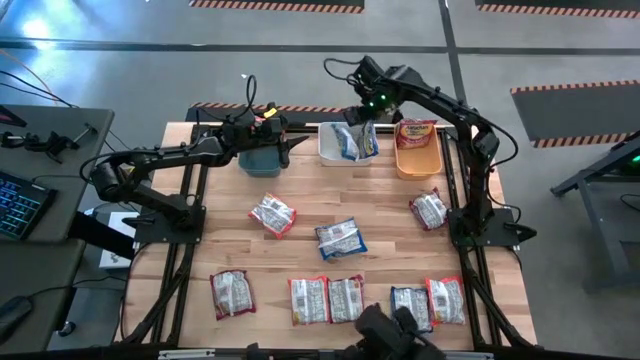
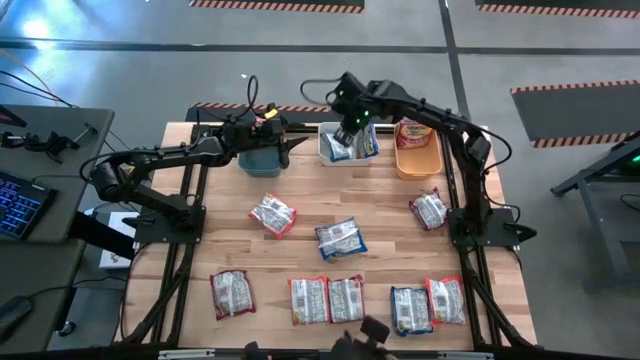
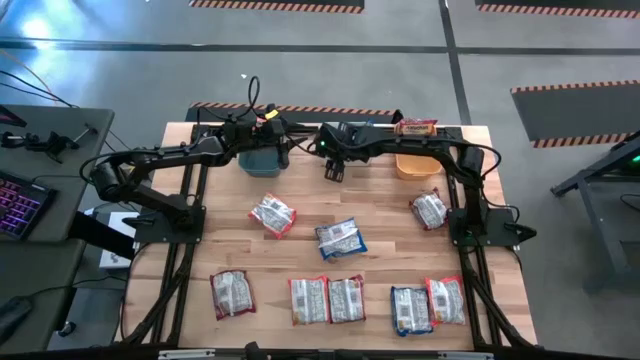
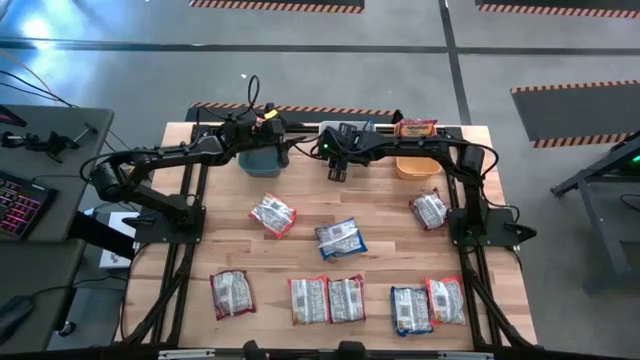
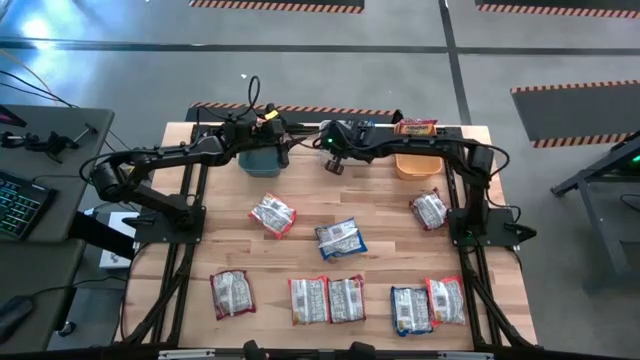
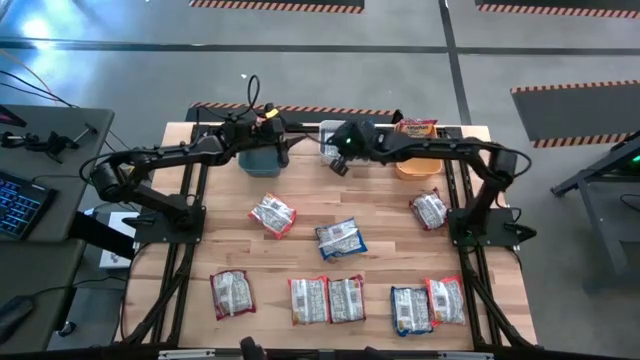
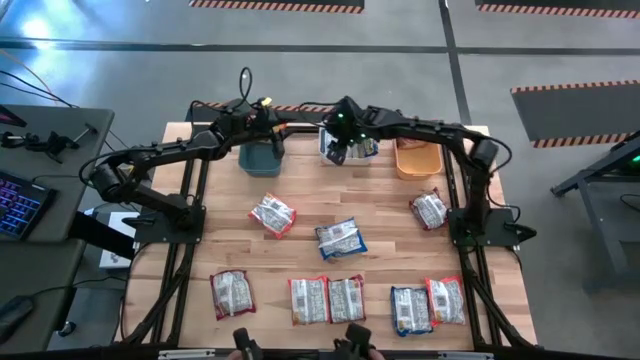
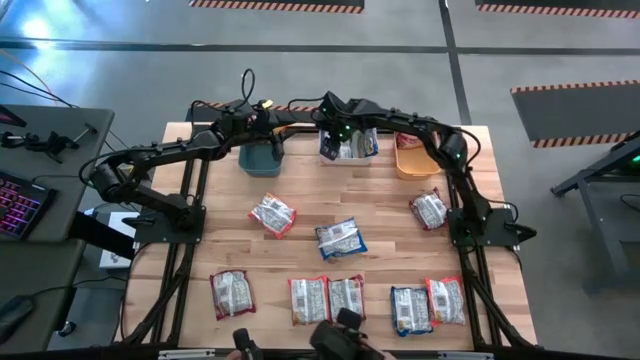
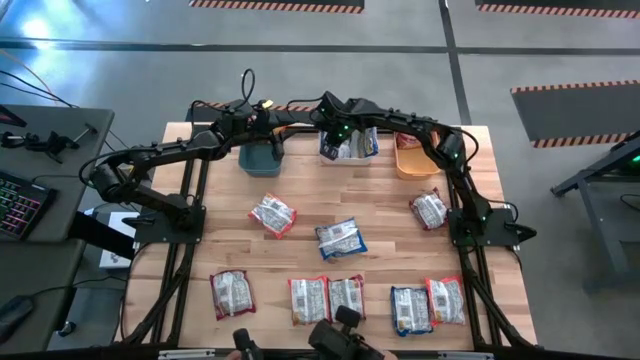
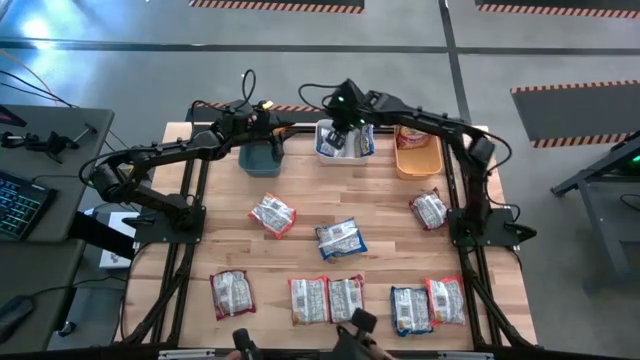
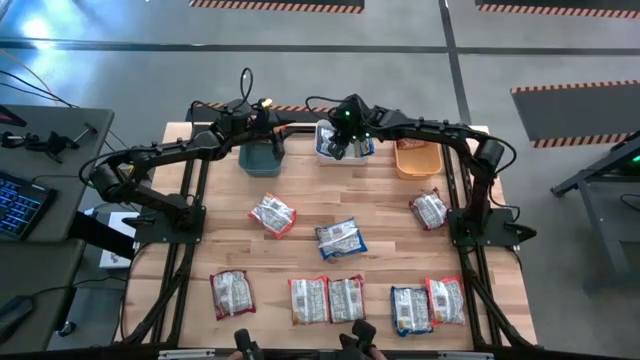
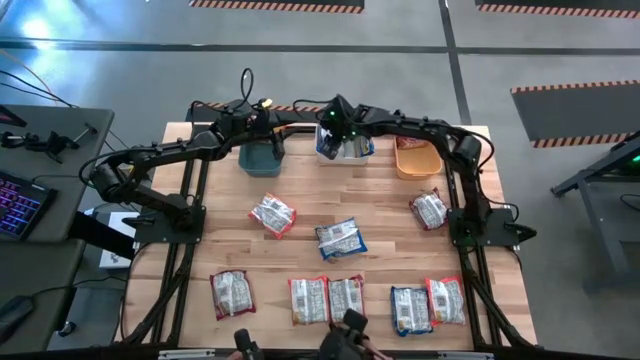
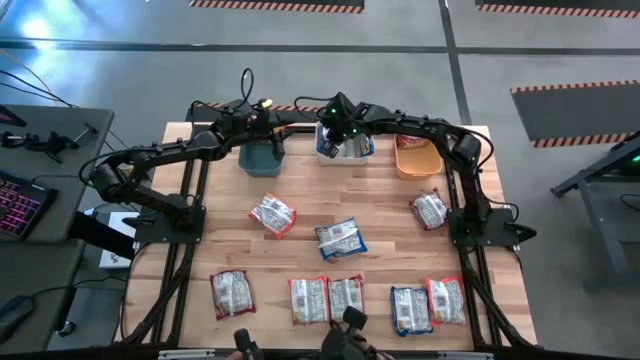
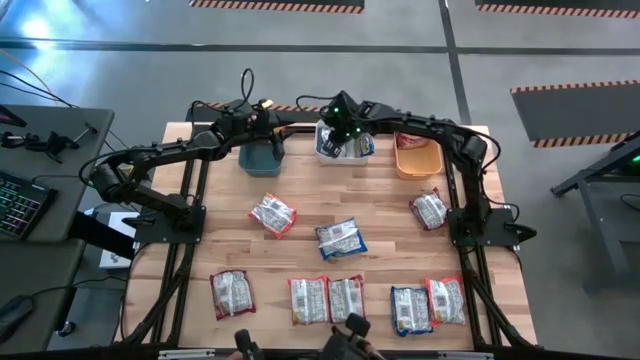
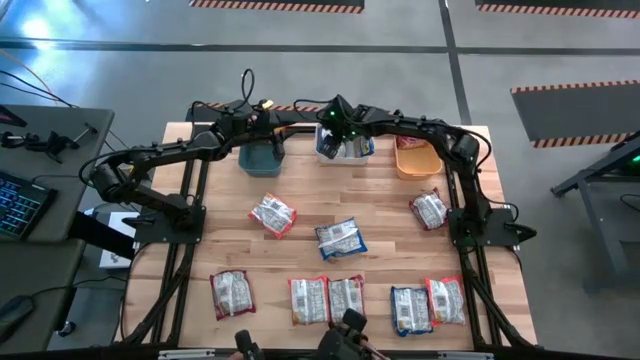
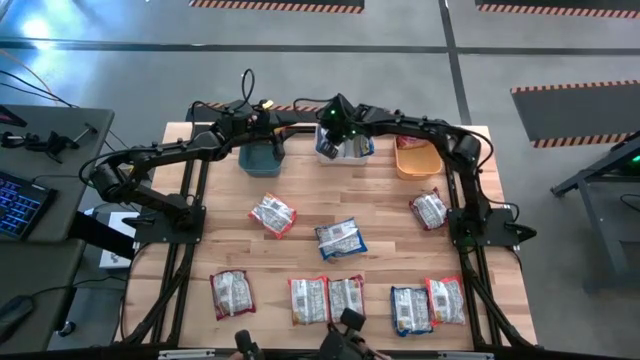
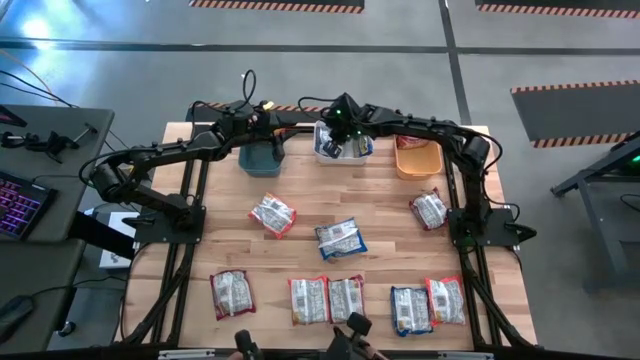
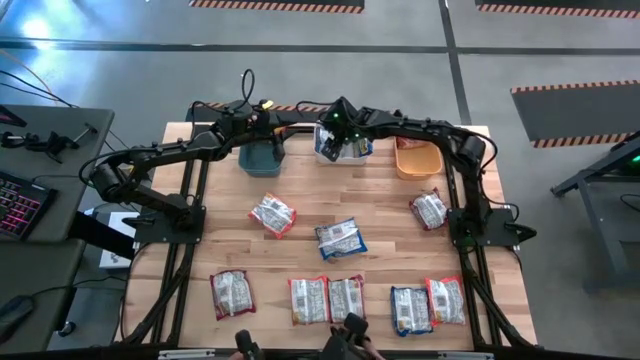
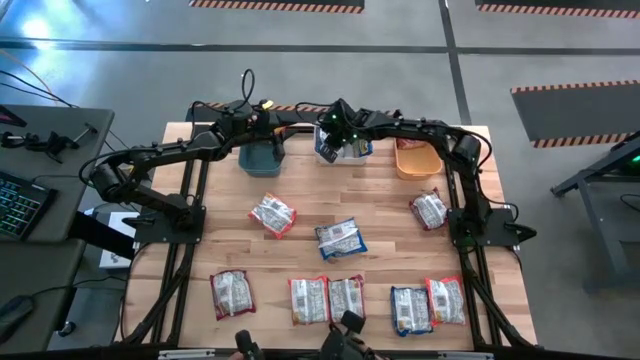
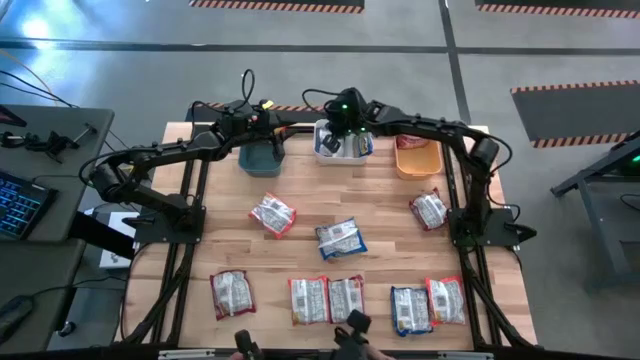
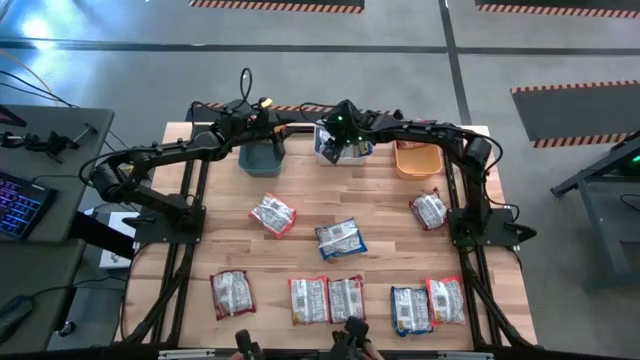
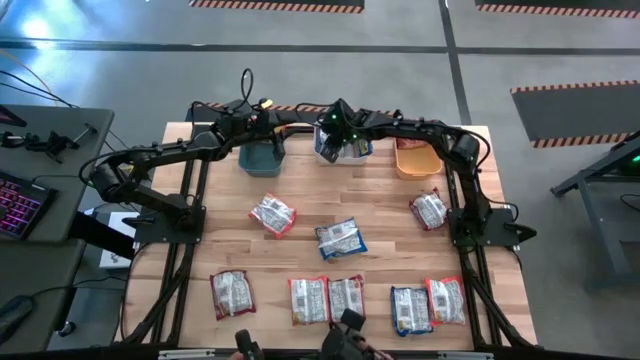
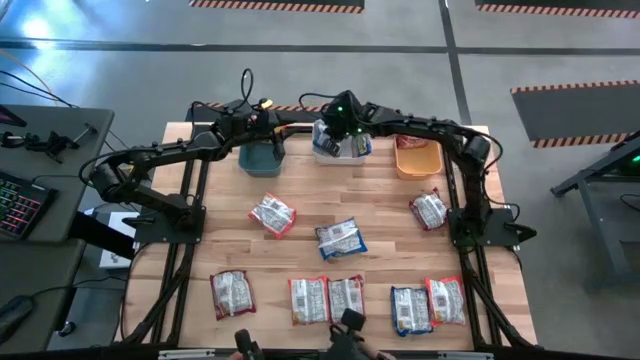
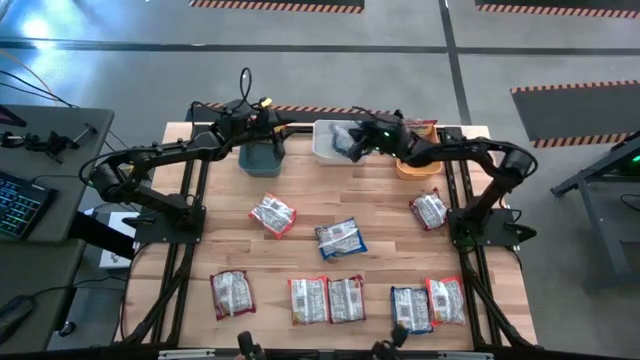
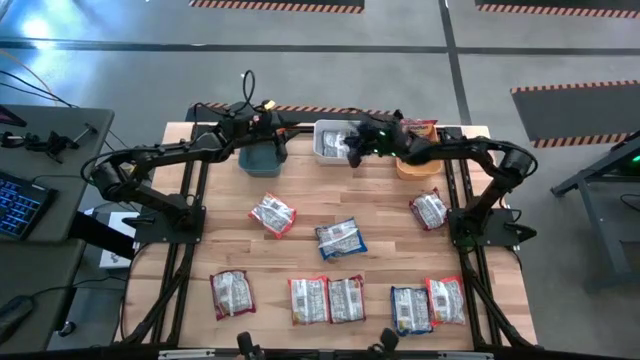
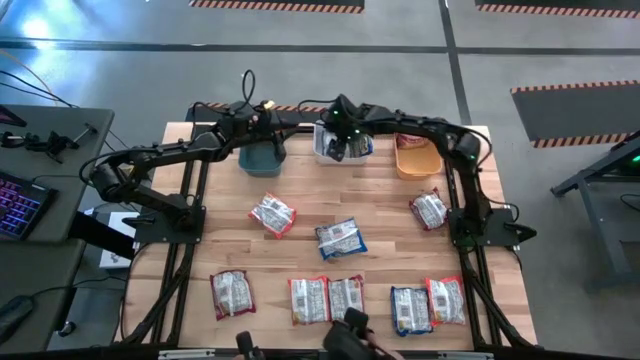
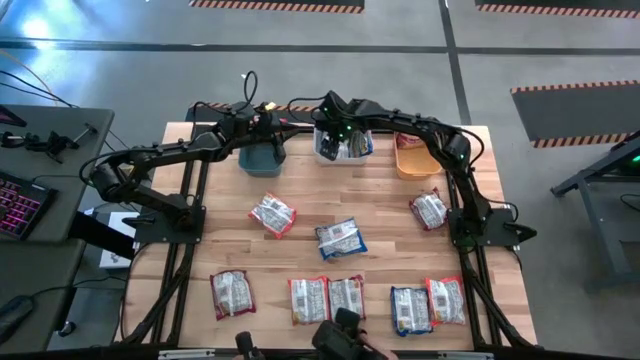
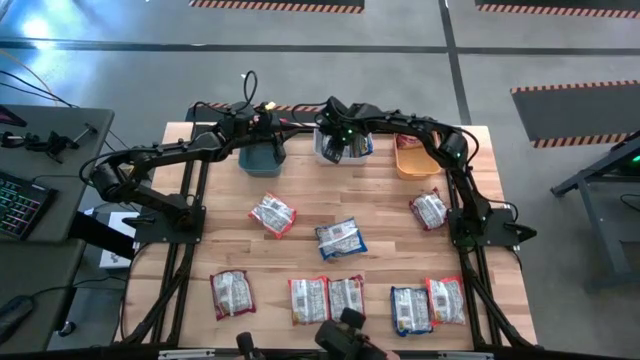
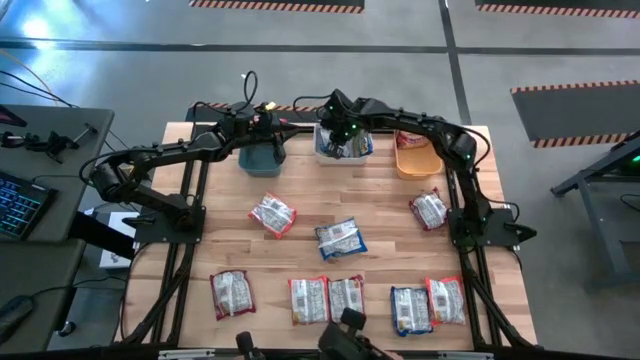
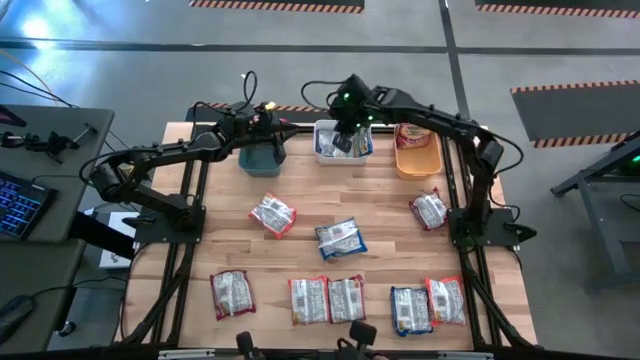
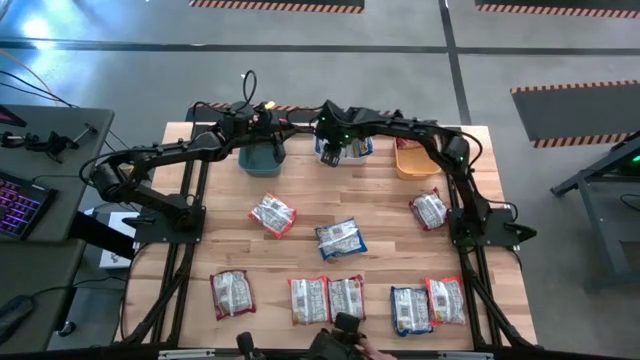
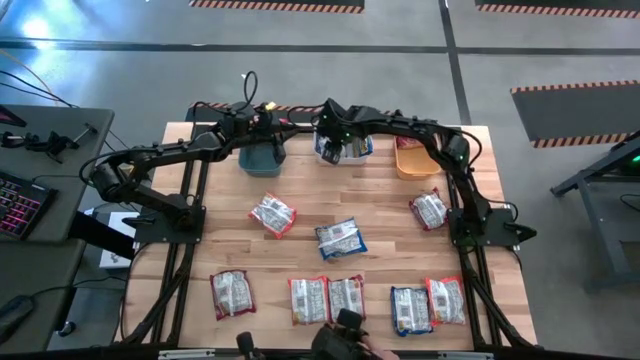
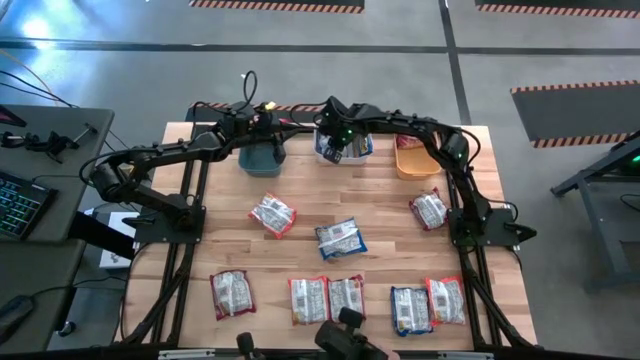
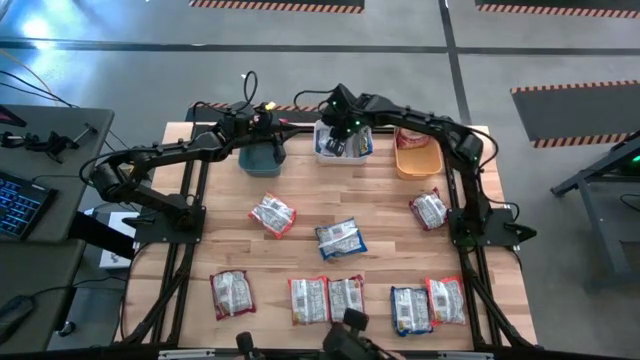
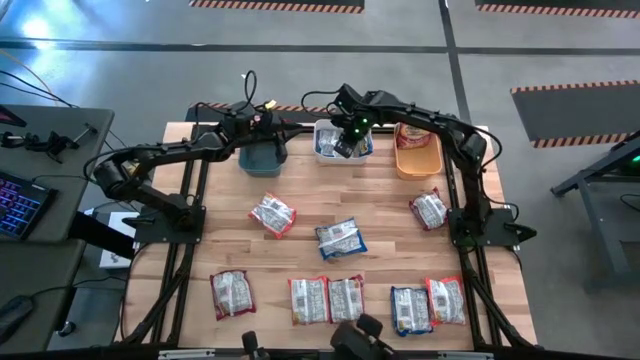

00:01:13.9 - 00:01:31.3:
Task: Sort Maruchan noodles
Remove the blue noodle pack from the white bin

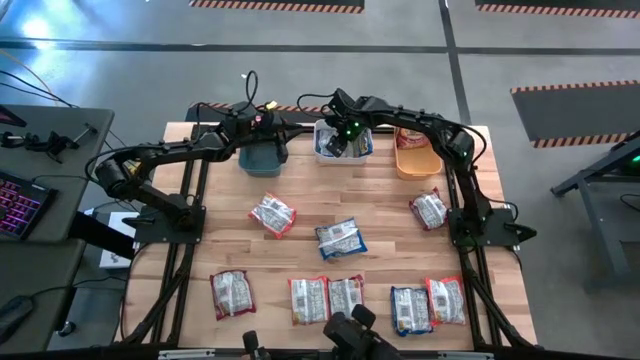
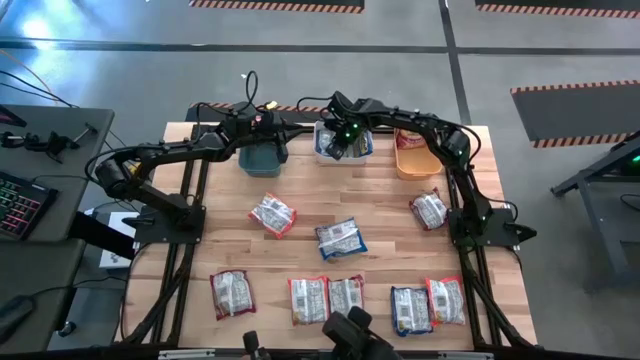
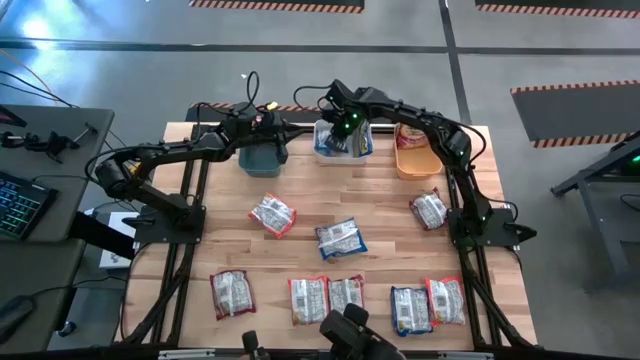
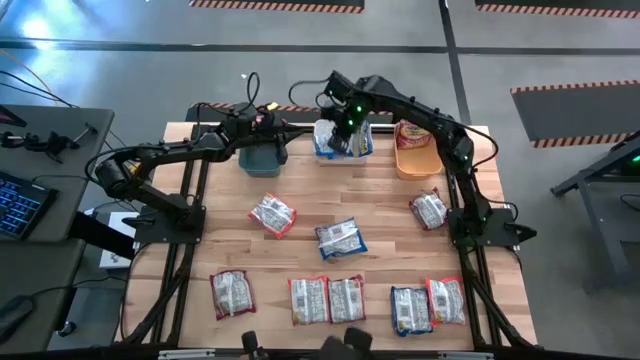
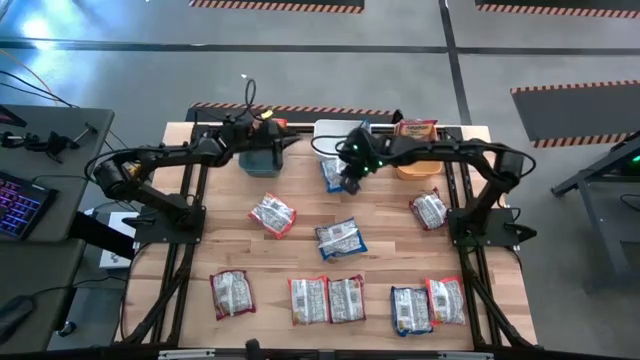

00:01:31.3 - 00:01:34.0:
Remove the blue noodle pack from the white bin

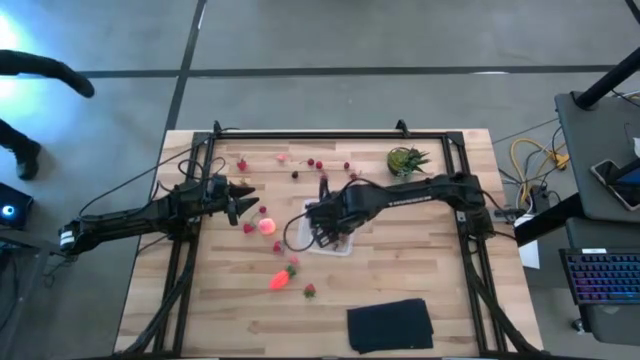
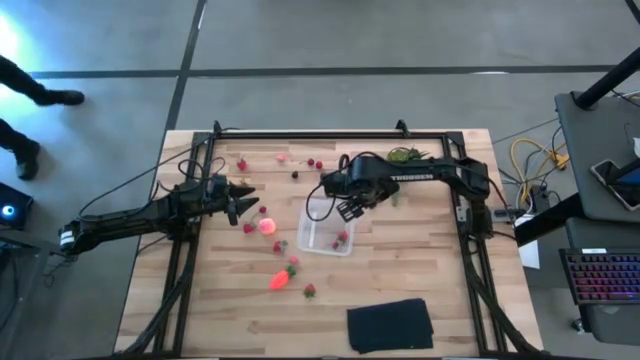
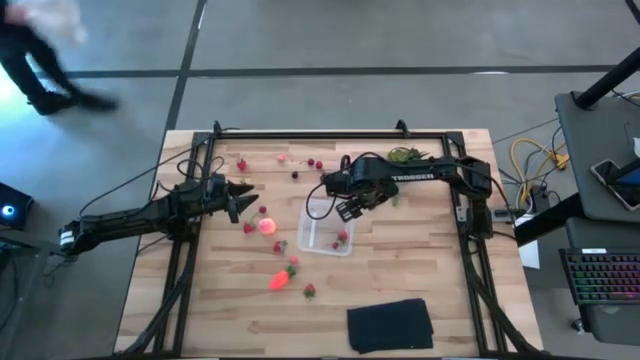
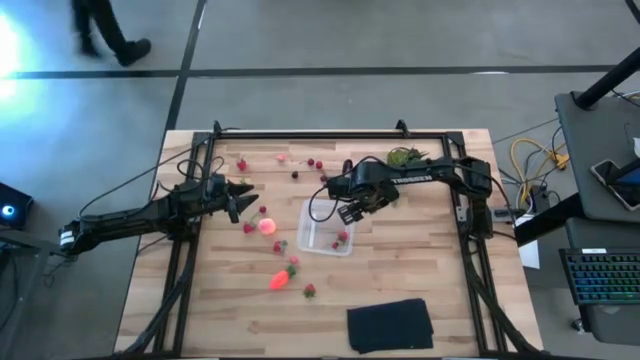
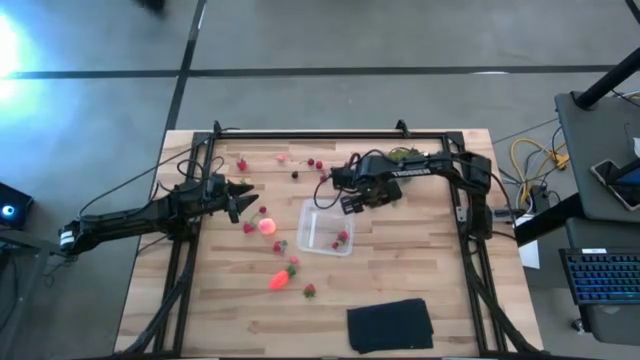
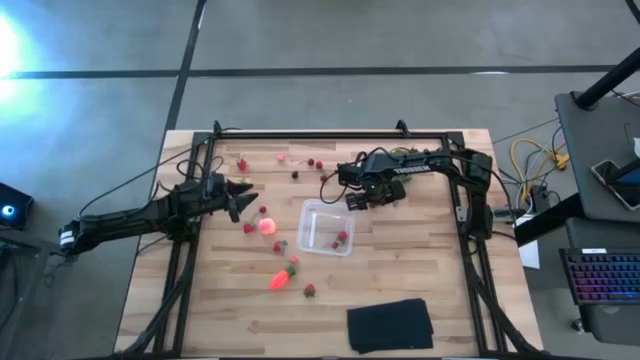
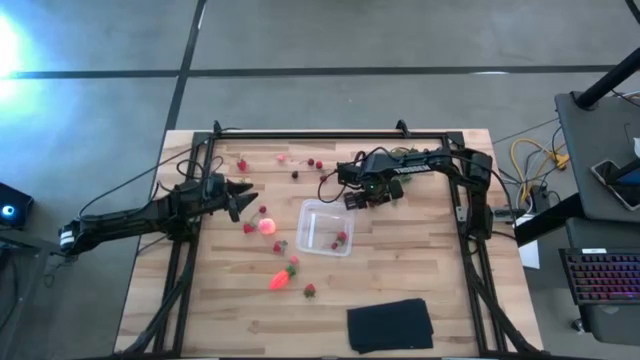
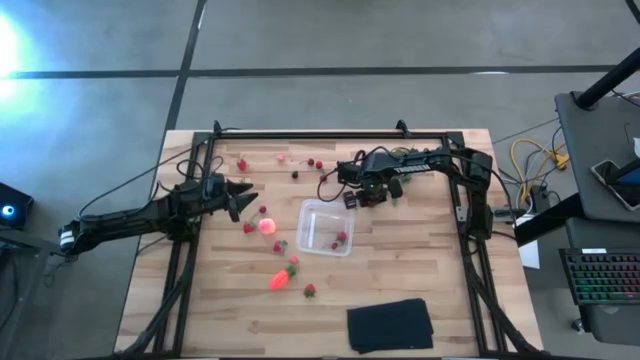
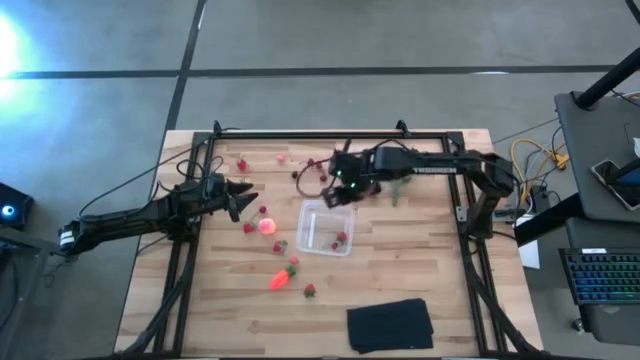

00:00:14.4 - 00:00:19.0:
Task: Pick and placing Produce into tupperware
Put the red cherry into the transparent bin
